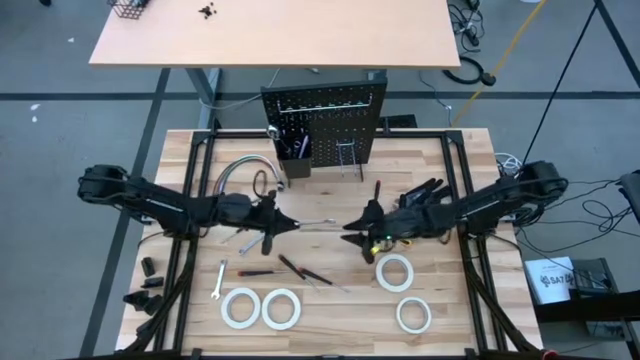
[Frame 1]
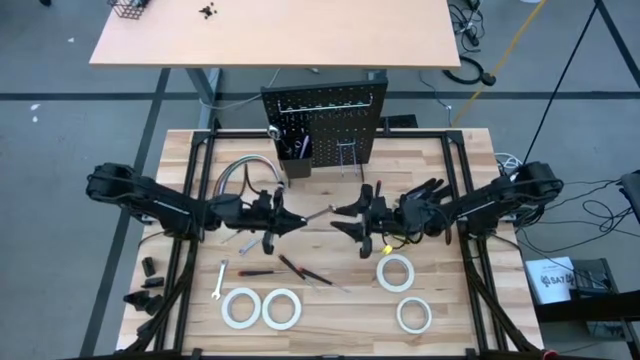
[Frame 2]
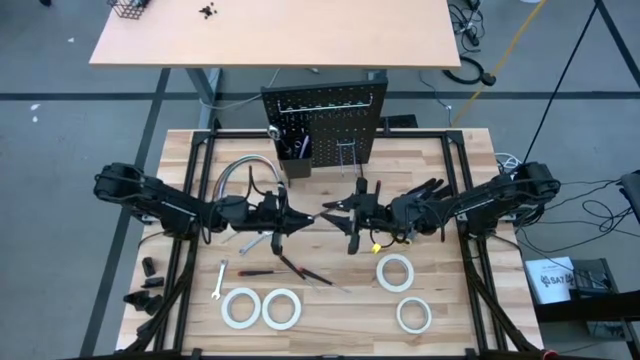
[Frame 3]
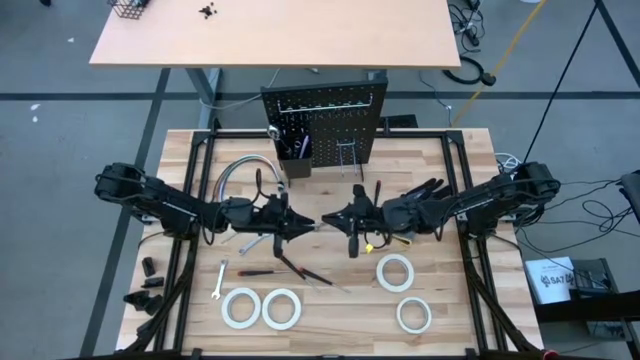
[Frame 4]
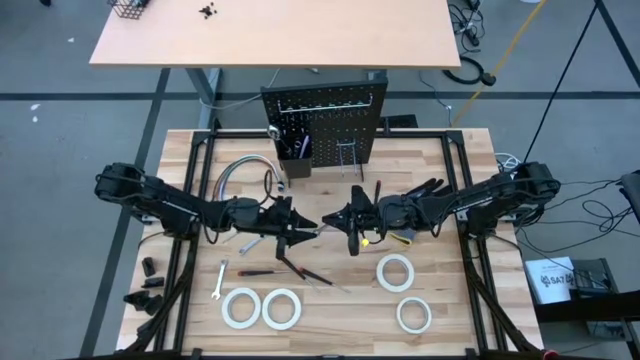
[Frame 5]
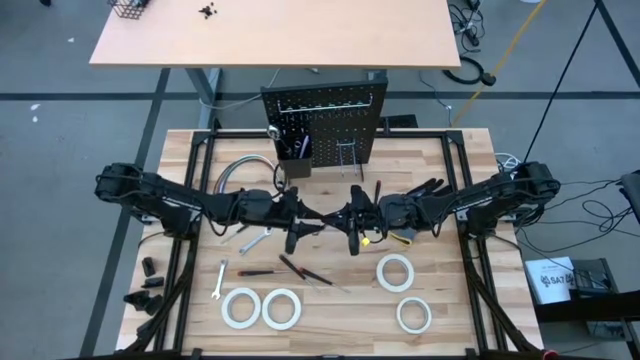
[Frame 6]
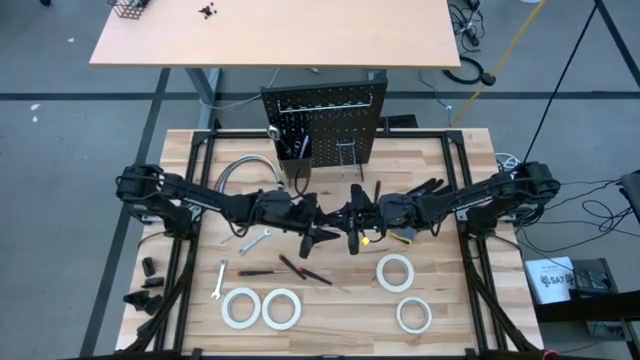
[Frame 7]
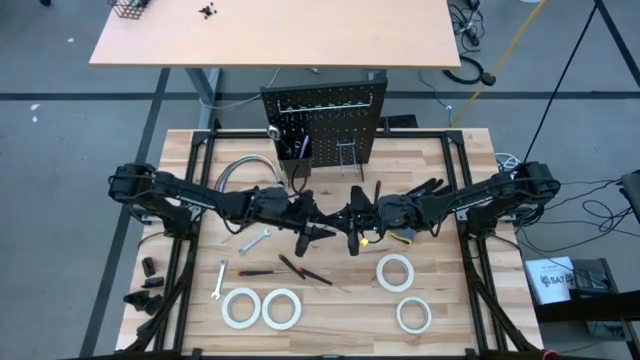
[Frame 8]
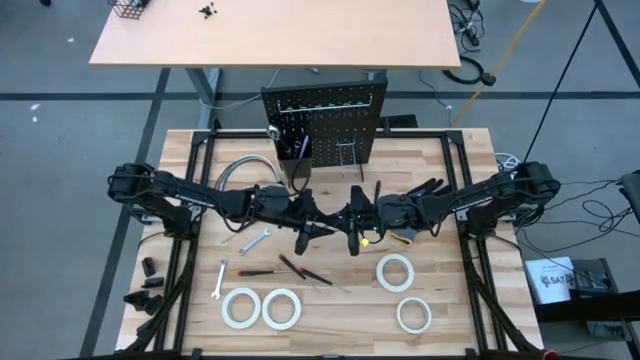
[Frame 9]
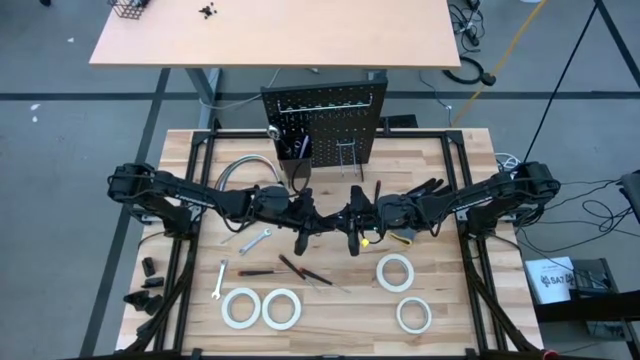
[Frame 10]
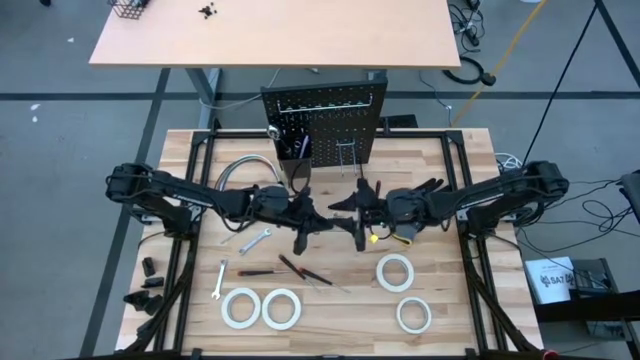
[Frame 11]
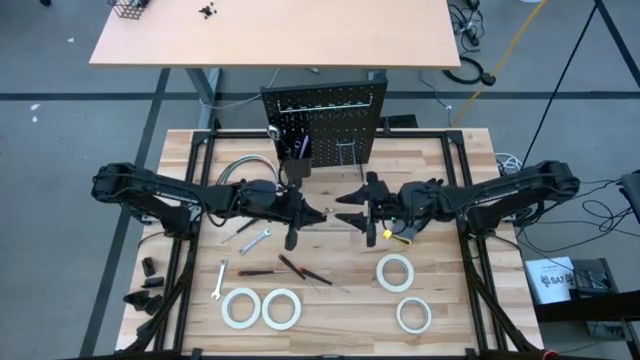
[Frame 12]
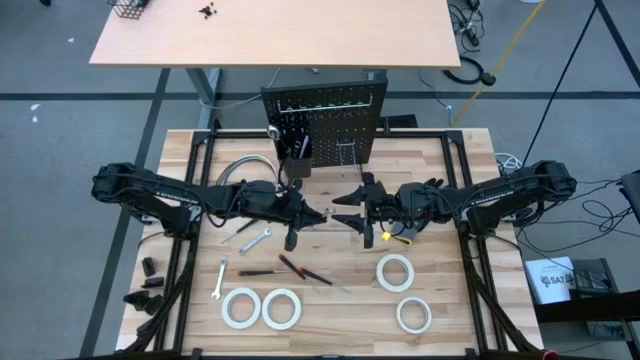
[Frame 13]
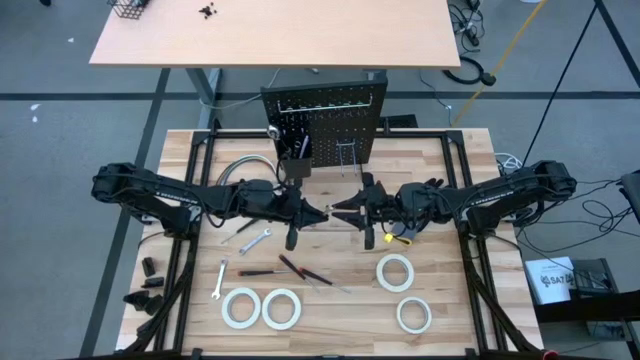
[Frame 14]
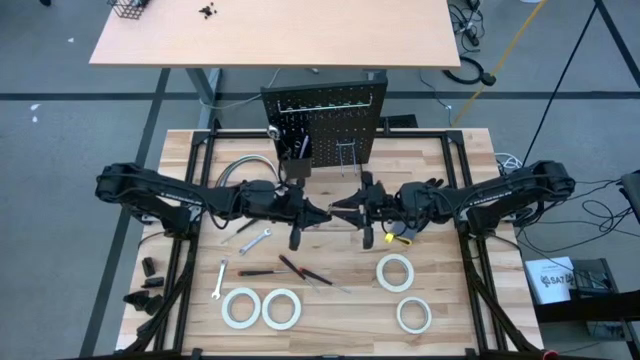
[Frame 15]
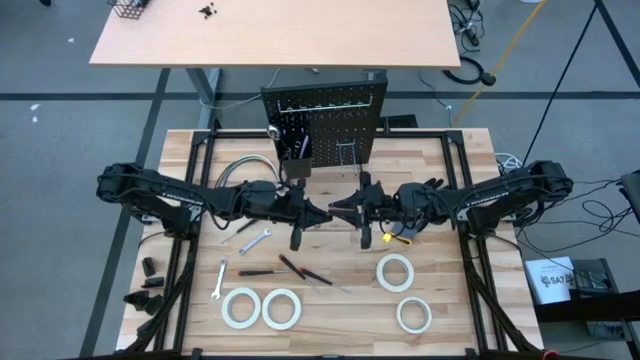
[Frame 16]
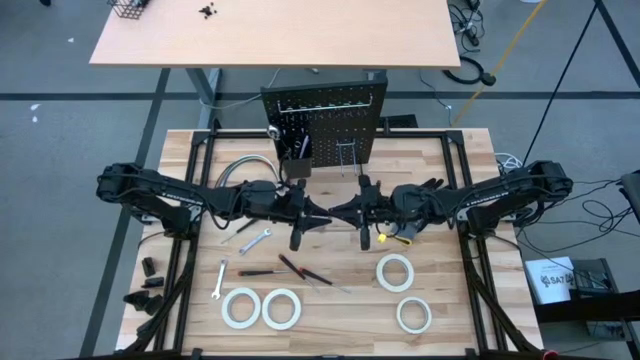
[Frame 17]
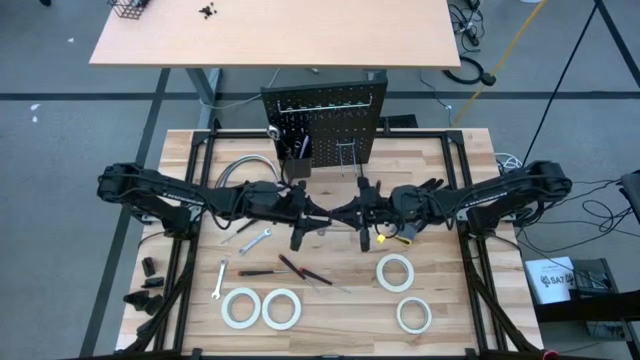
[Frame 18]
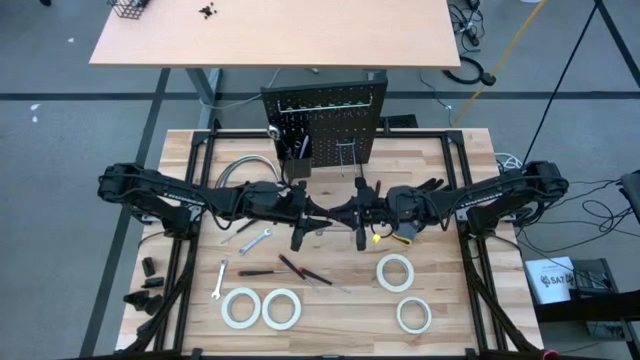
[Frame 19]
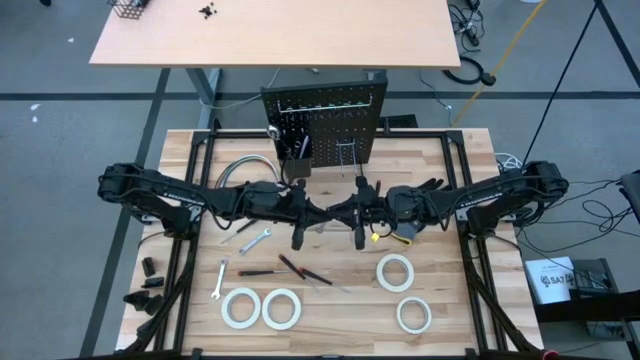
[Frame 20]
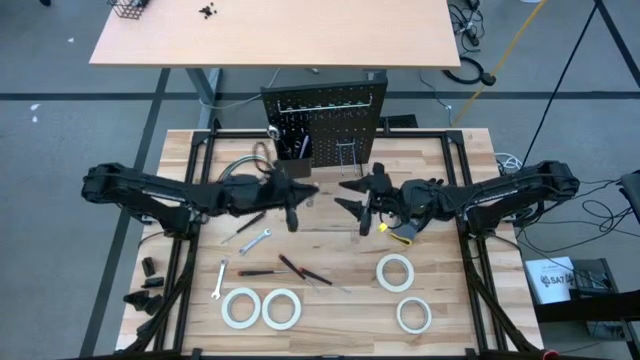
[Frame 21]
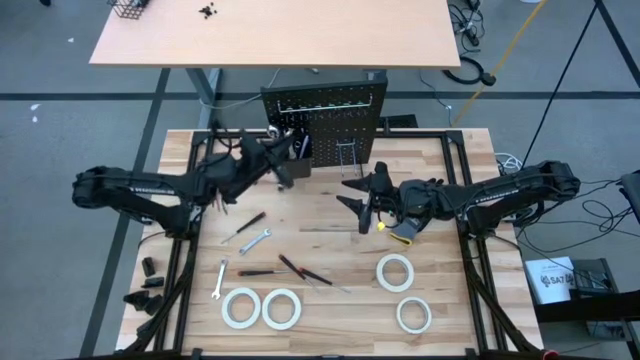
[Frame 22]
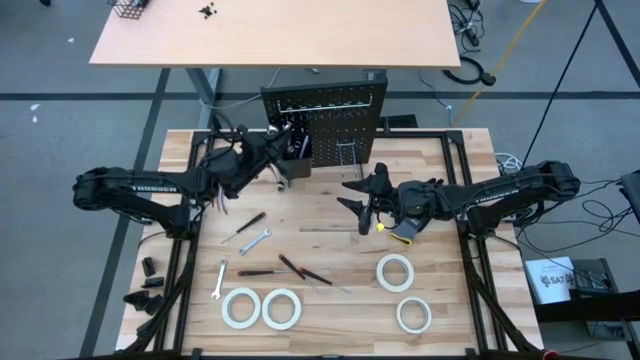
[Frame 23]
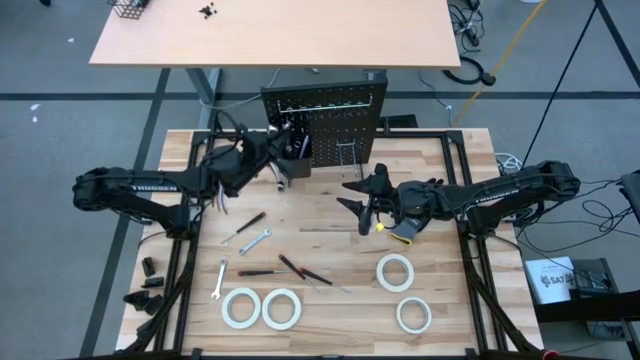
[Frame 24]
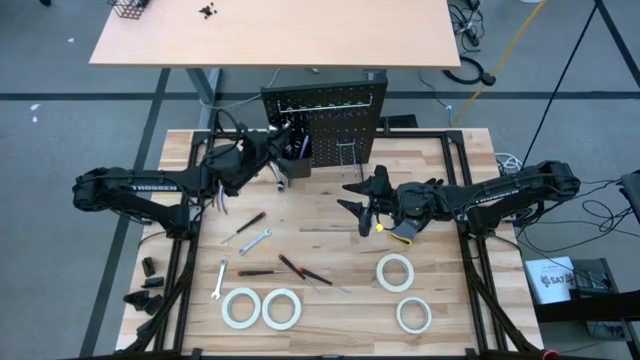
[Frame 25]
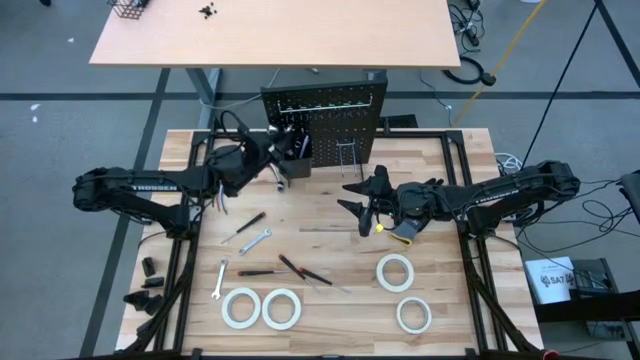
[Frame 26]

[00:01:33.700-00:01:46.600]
Task: Hang tools onto peg board
Put the wrench into the peg board

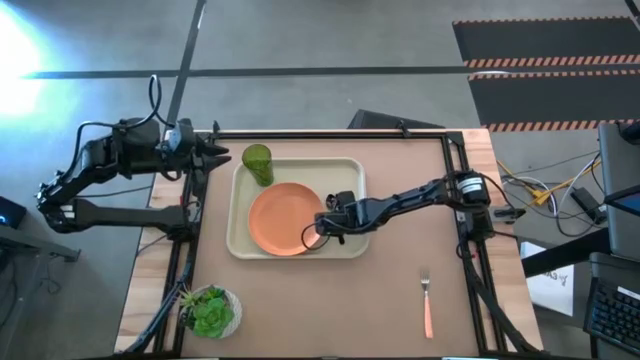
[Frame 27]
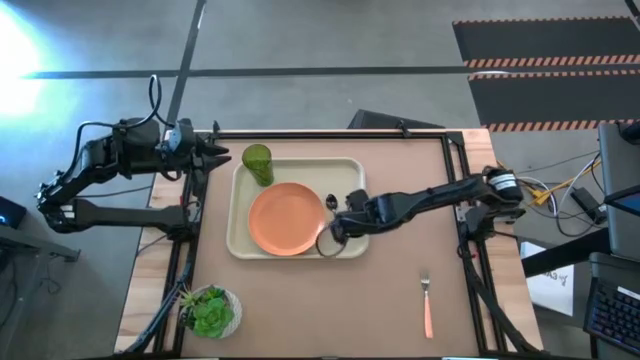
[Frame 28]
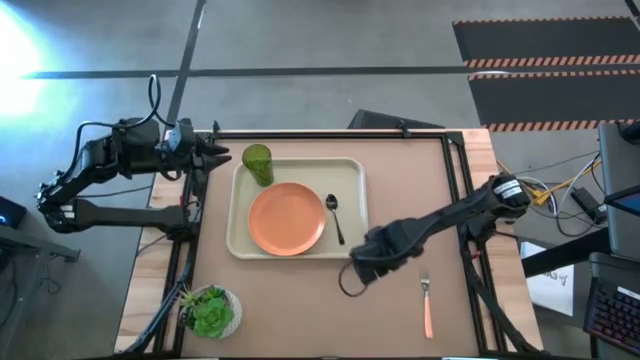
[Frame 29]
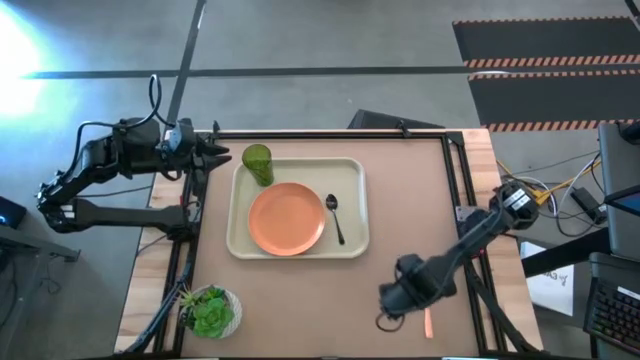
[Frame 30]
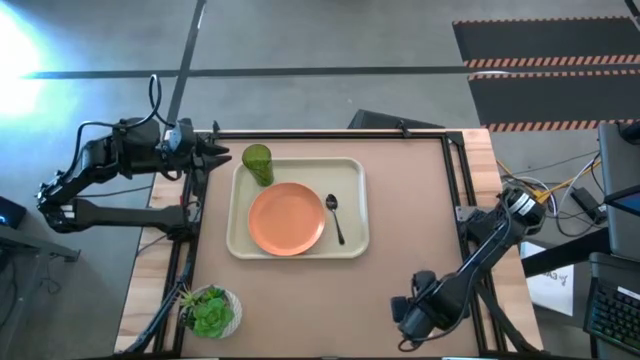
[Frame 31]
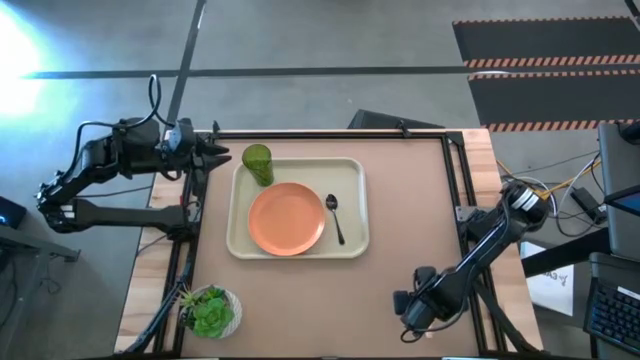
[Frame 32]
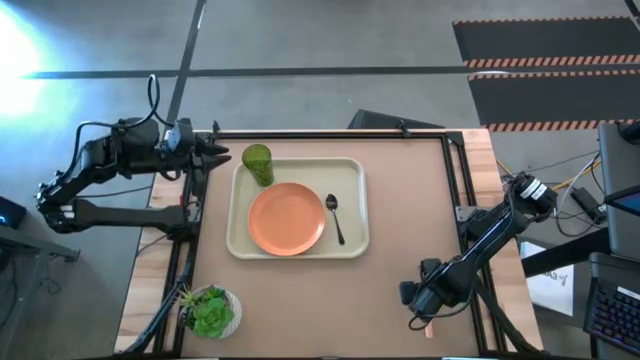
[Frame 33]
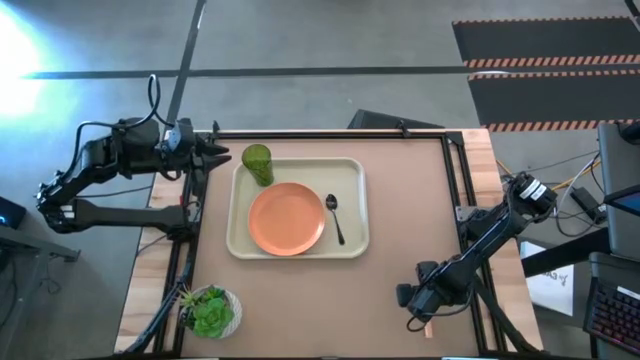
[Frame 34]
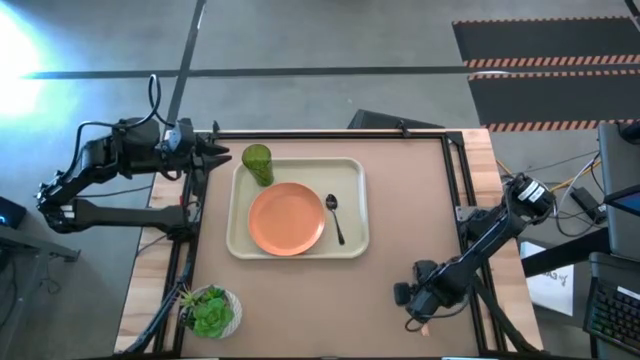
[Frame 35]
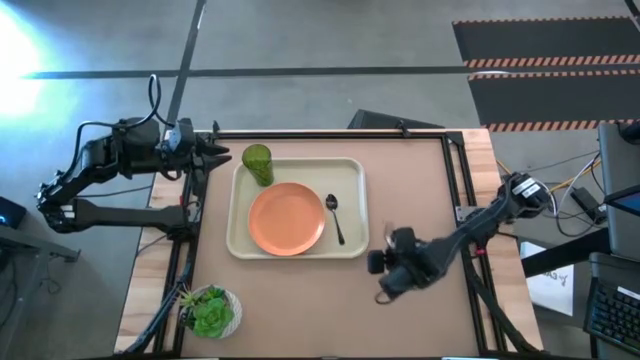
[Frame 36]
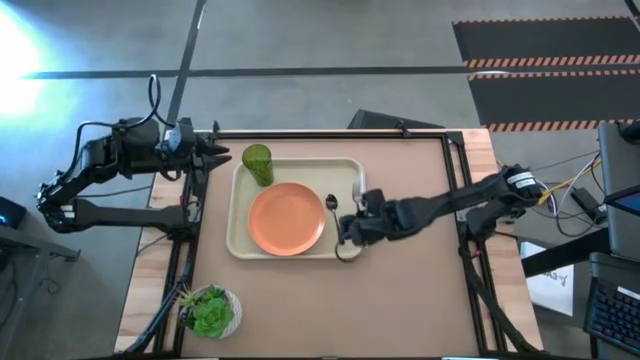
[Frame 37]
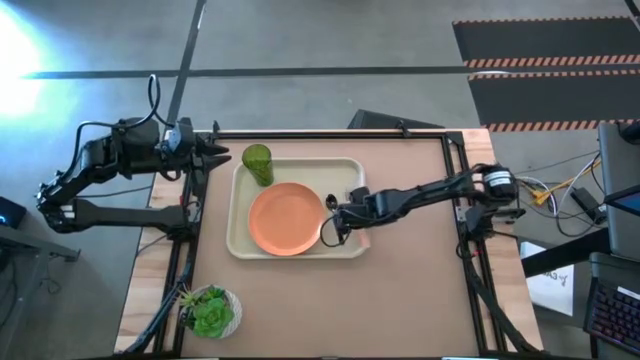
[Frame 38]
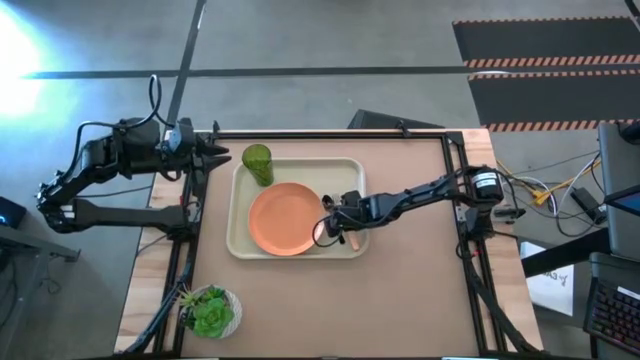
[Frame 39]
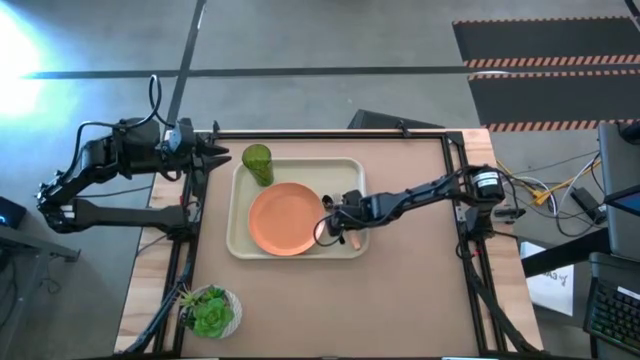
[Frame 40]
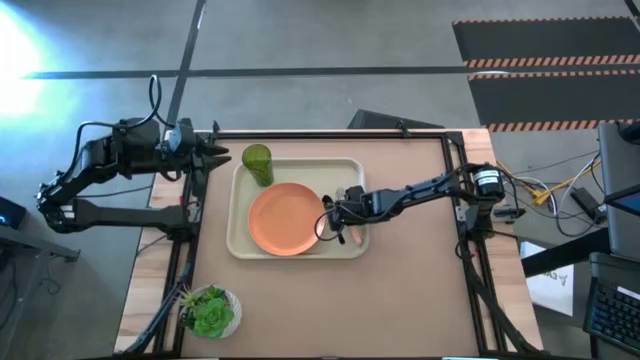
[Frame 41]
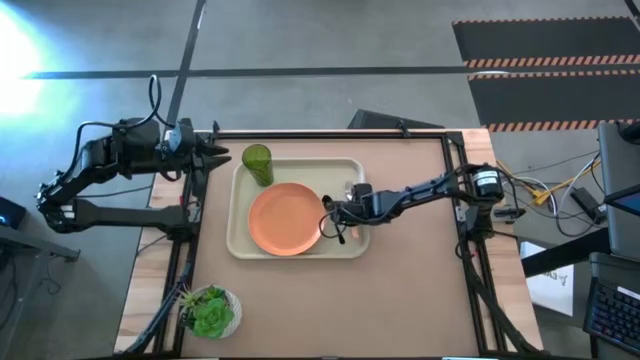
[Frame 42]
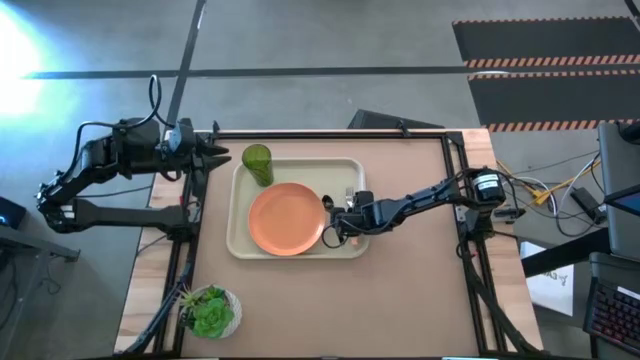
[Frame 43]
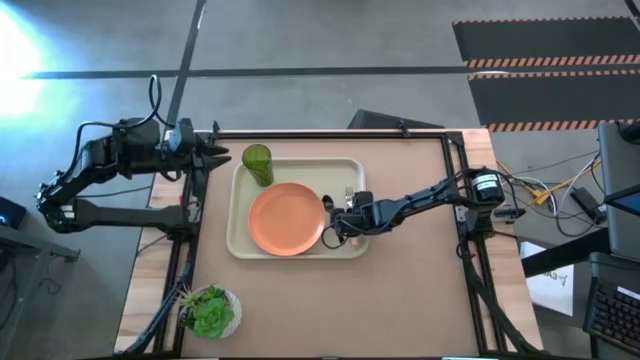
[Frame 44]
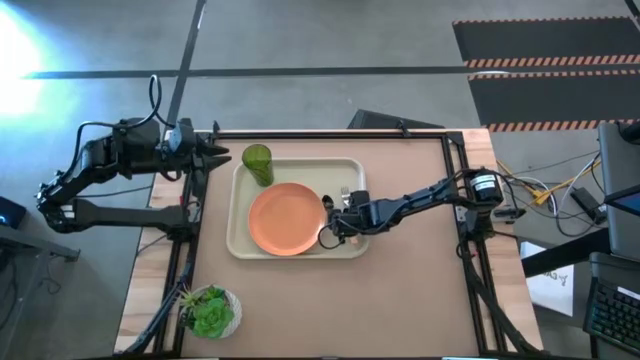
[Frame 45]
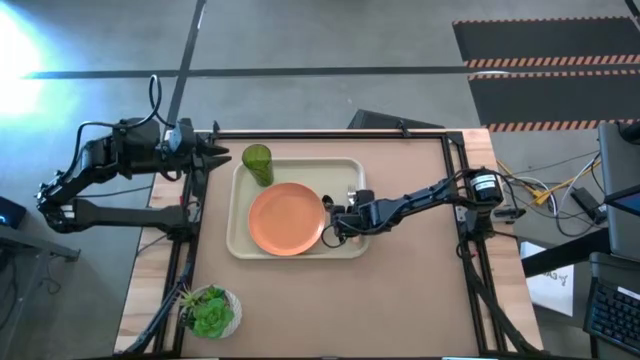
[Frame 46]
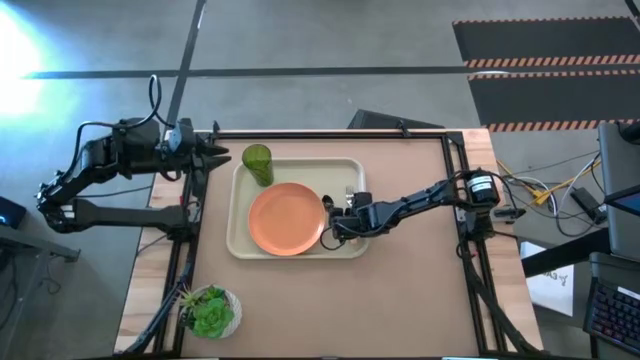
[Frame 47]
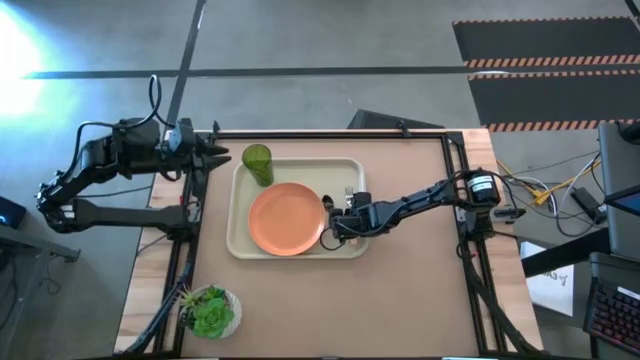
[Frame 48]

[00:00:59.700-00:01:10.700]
Task: Pick and place plate/cup/fork/spoon on tray
Put the orange fork on the white serving tray to the right of the black spoon
